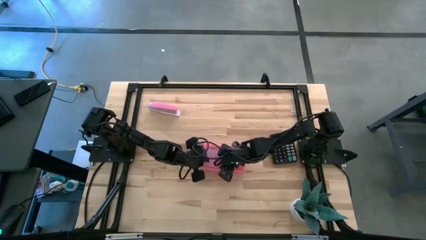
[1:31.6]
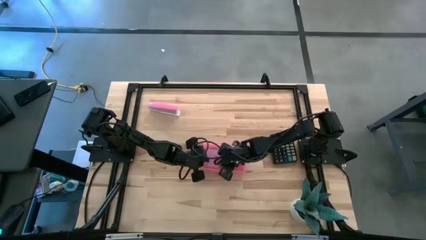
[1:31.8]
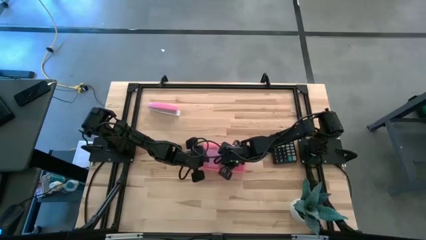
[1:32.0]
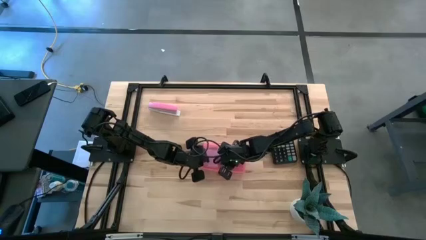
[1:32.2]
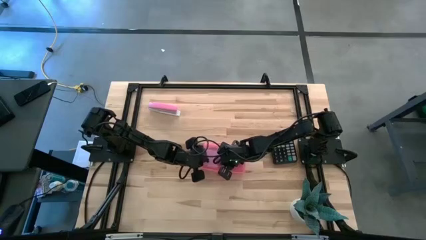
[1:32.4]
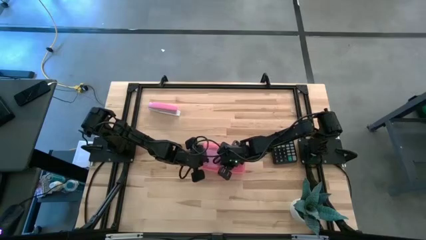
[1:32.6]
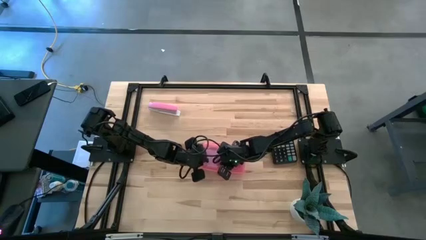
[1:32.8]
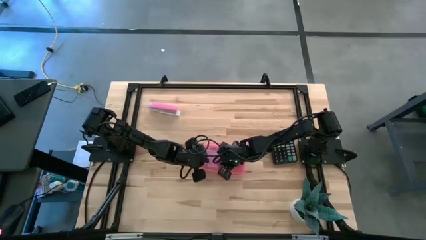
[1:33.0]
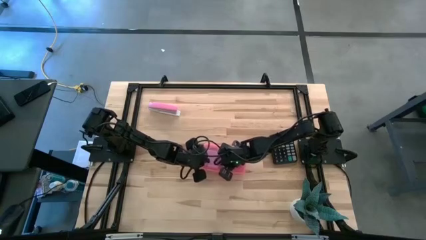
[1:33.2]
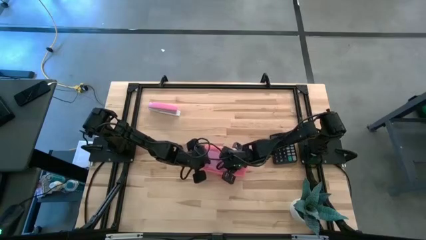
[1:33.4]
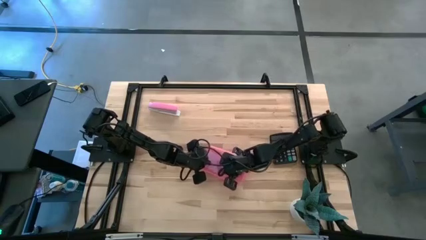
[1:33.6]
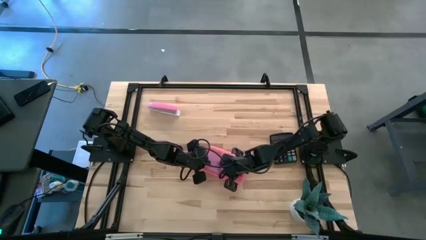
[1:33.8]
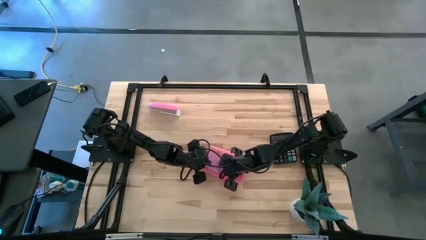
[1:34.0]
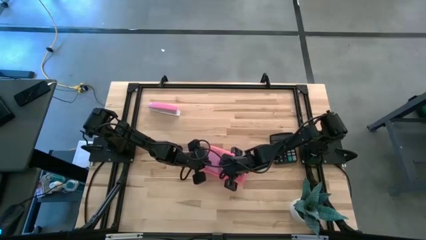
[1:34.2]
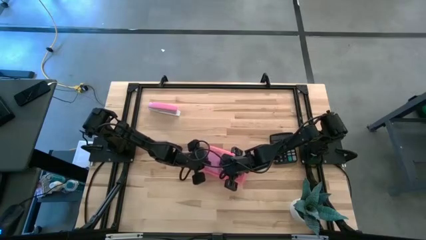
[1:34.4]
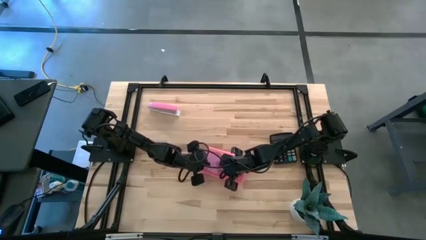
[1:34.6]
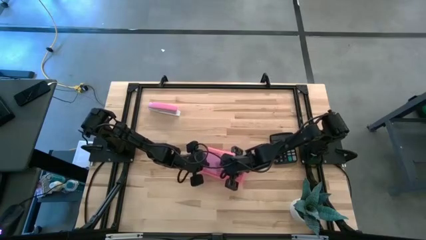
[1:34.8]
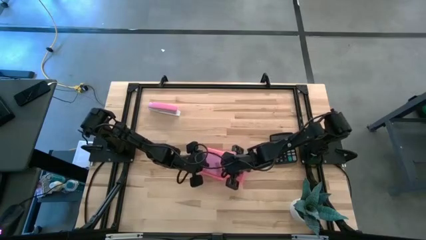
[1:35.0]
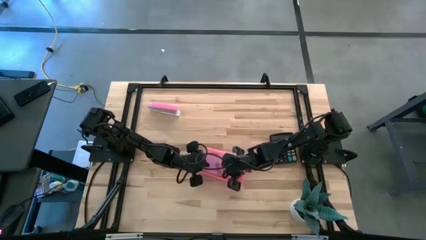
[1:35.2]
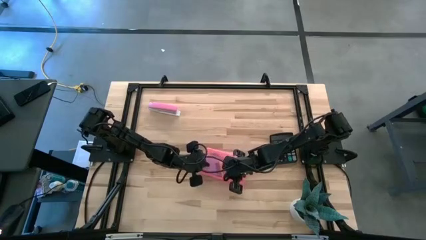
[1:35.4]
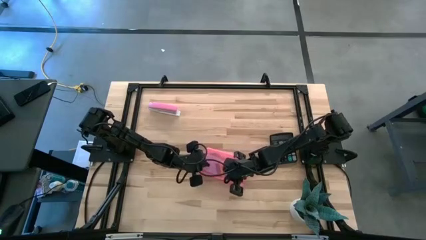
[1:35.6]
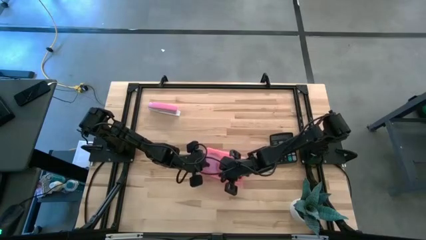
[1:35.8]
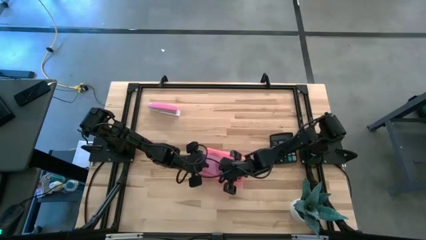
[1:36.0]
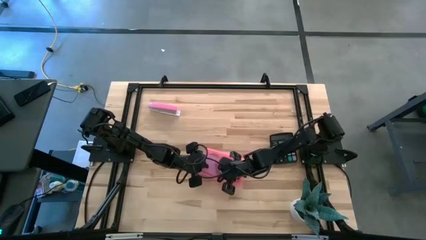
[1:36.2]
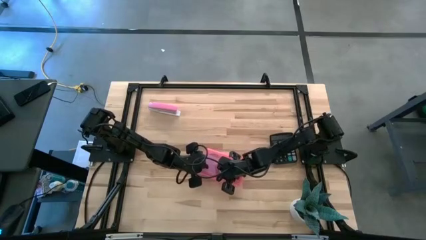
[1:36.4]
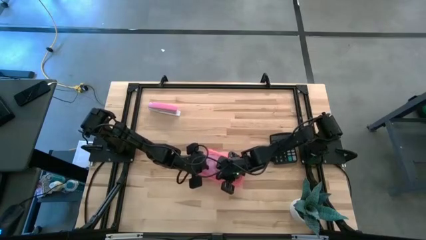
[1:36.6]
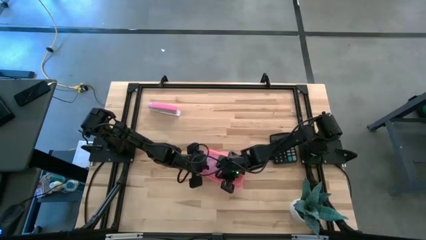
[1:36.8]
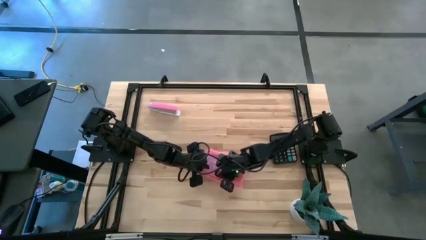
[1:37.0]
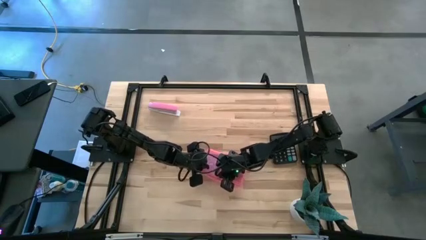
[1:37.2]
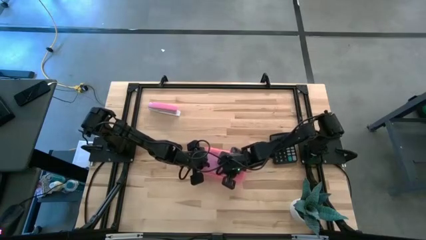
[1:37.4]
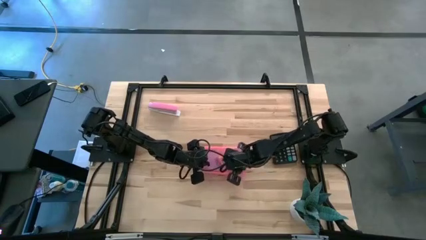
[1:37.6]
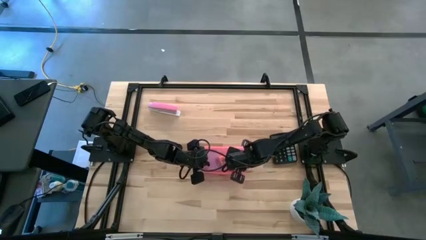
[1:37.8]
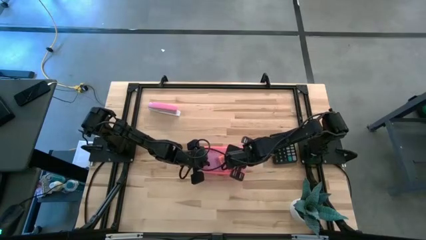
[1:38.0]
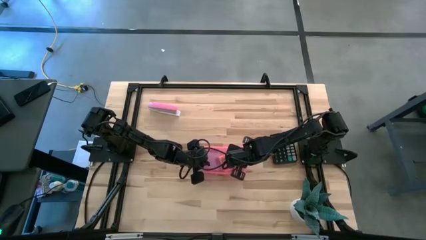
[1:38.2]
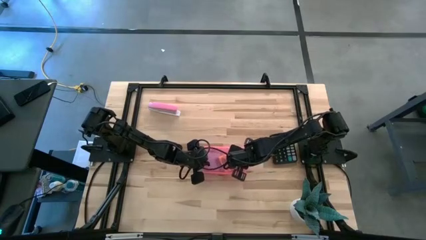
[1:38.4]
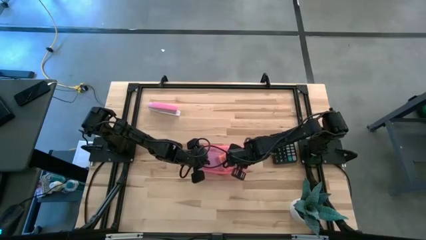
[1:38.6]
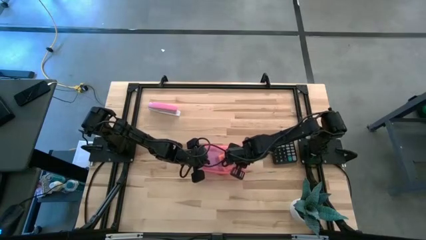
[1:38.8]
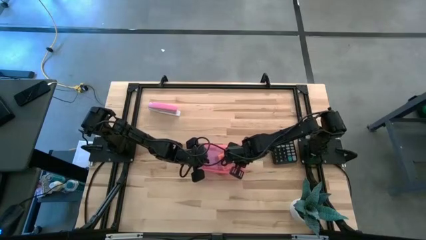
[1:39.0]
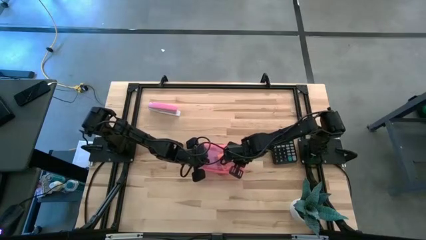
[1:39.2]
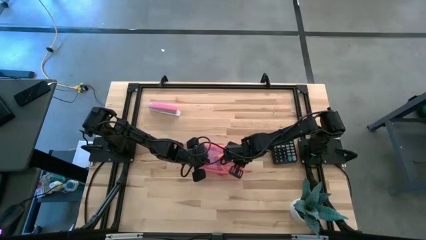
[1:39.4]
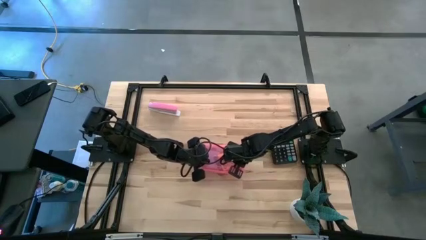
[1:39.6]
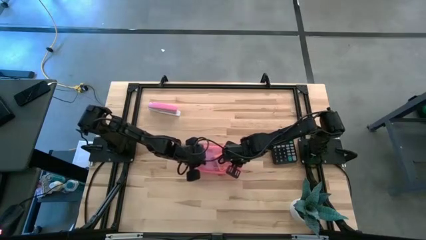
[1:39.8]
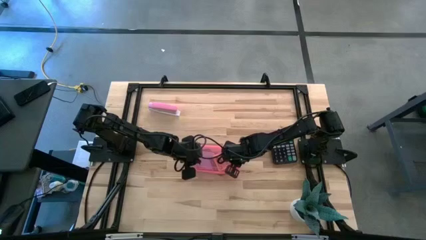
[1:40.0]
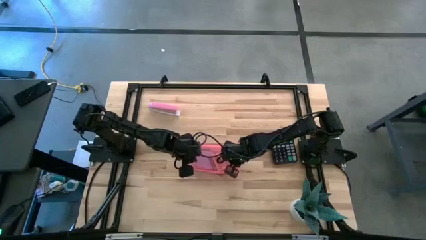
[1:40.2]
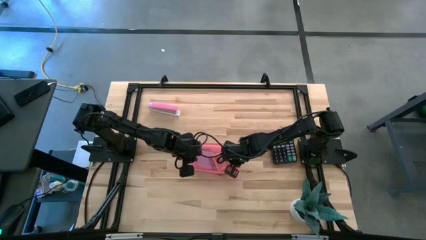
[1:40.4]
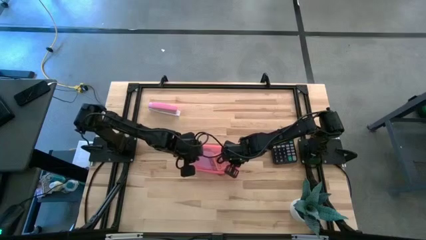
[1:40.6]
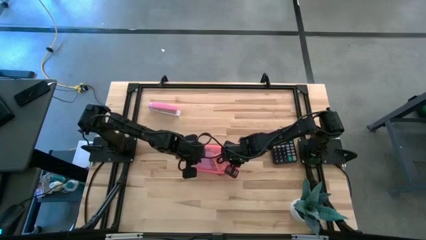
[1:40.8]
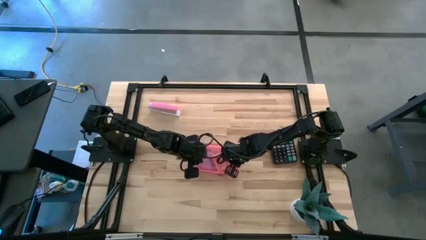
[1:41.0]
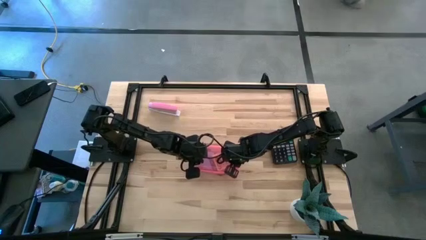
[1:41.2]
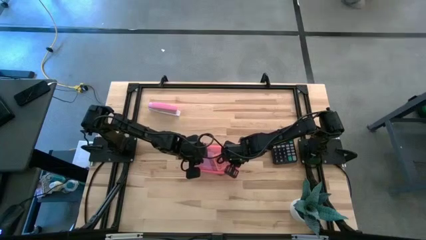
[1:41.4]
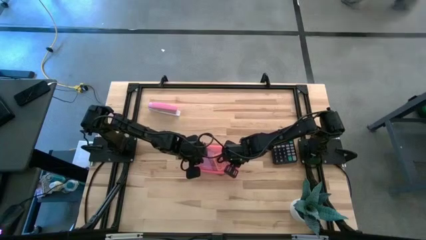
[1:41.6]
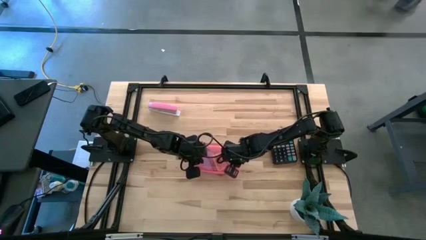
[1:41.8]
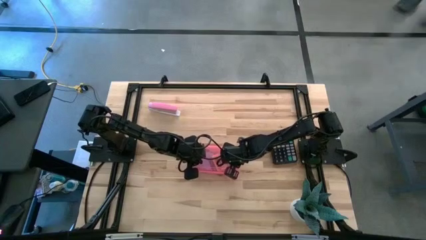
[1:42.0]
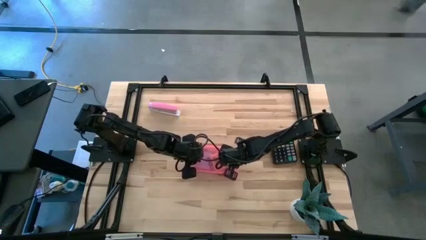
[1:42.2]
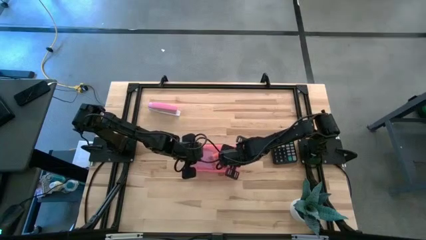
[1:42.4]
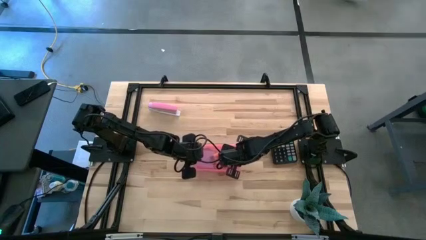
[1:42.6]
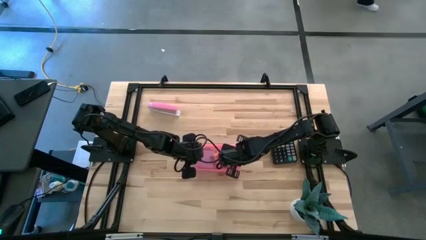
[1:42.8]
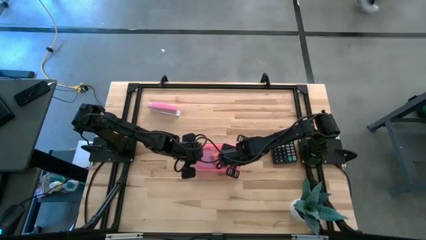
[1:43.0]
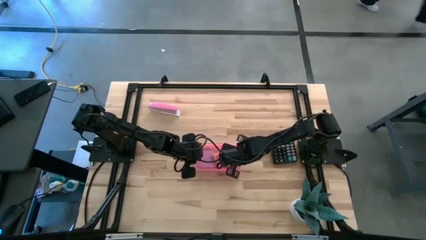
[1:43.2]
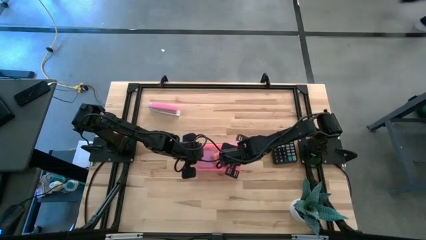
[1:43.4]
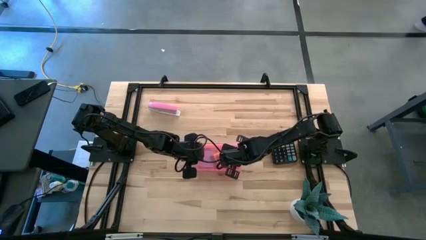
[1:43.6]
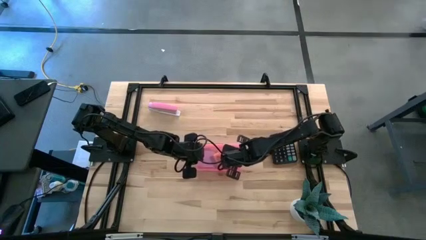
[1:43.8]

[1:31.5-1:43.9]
Task: Pack school essentials
Close the supply box

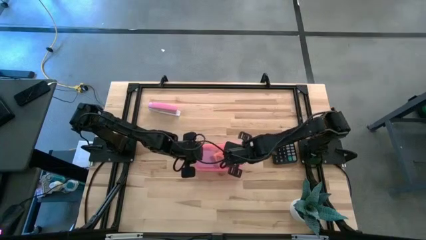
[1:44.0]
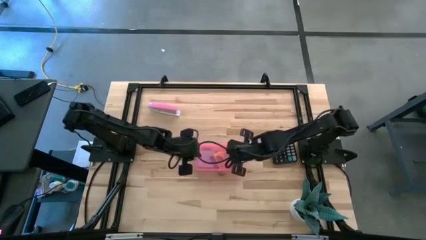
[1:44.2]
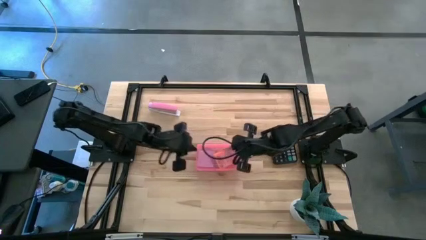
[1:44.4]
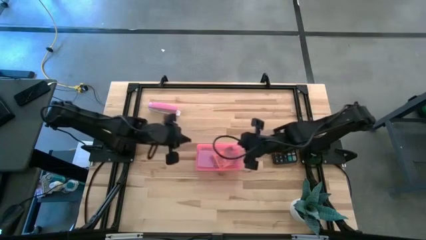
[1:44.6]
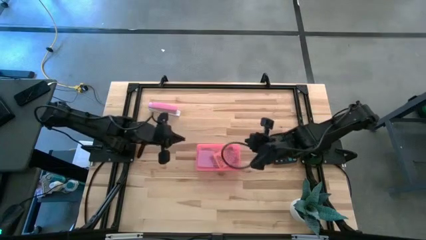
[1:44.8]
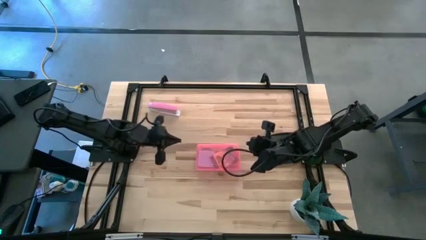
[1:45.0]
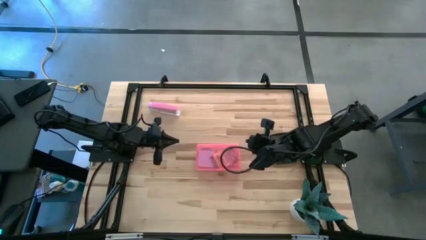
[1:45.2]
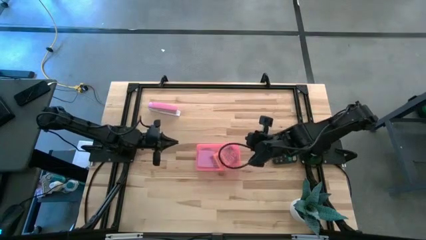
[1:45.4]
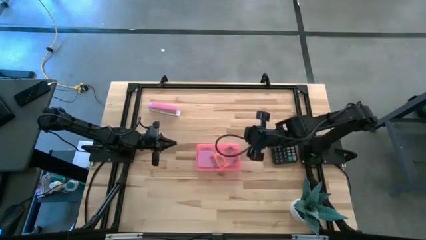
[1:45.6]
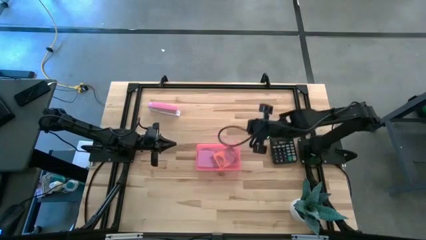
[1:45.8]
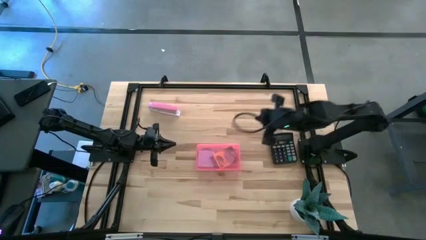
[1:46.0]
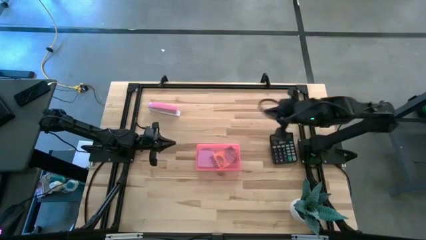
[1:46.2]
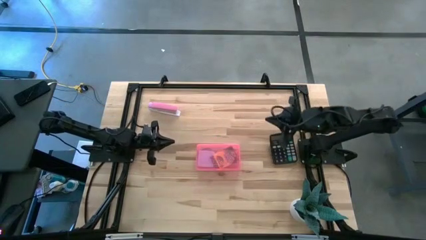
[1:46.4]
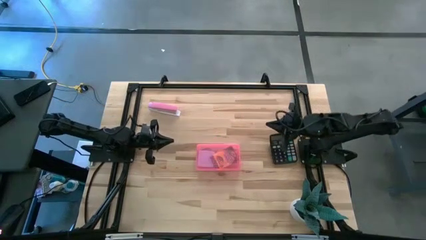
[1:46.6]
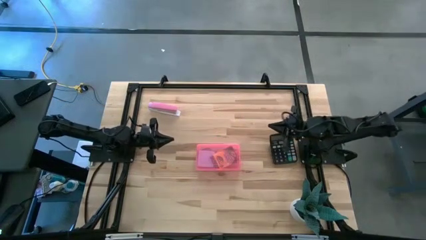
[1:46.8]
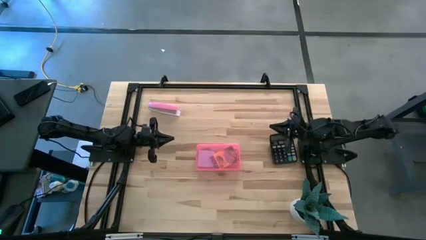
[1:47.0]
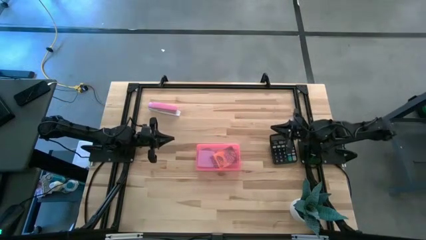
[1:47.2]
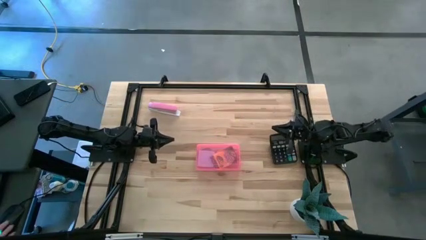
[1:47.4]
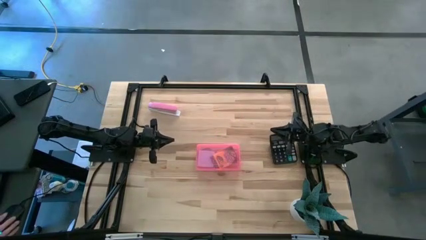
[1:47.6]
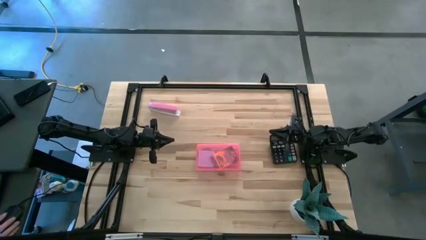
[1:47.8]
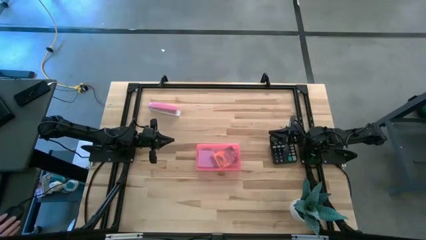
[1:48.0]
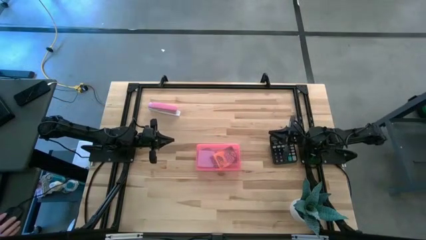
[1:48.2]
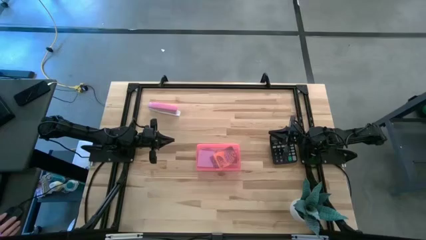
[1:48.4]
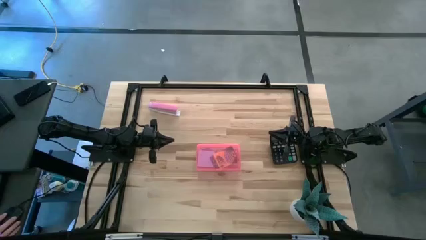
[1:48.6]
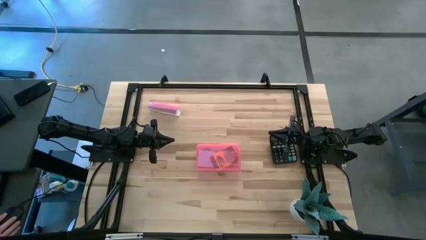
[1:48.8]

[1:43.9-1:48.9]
Return to Home Position
